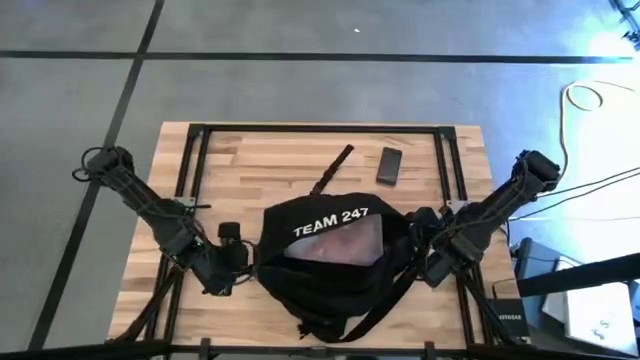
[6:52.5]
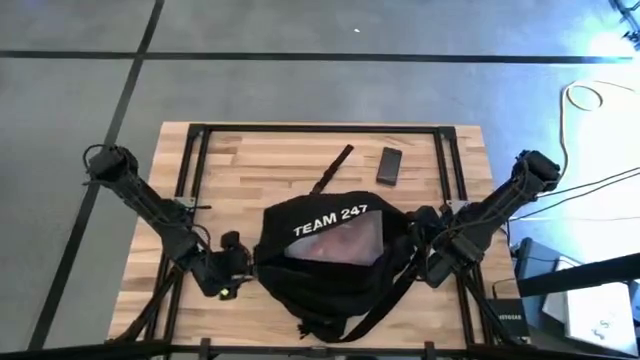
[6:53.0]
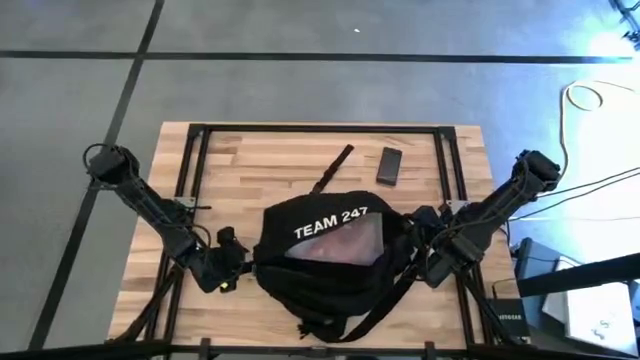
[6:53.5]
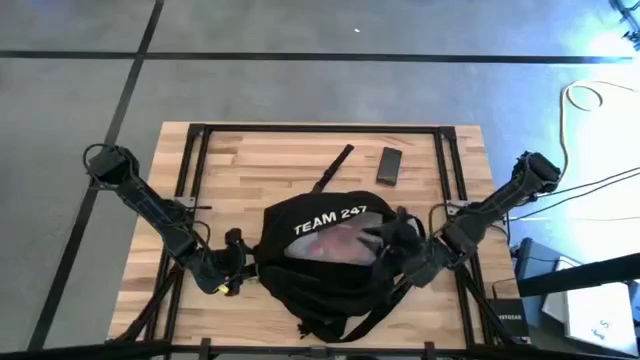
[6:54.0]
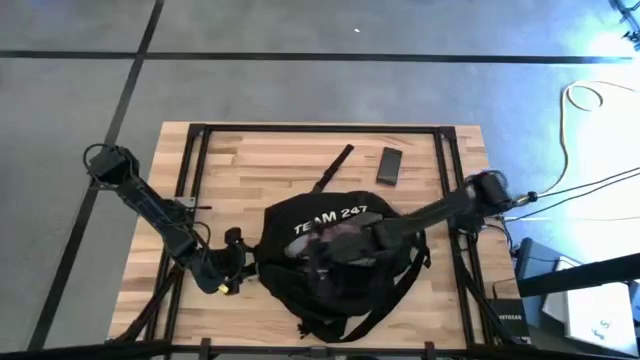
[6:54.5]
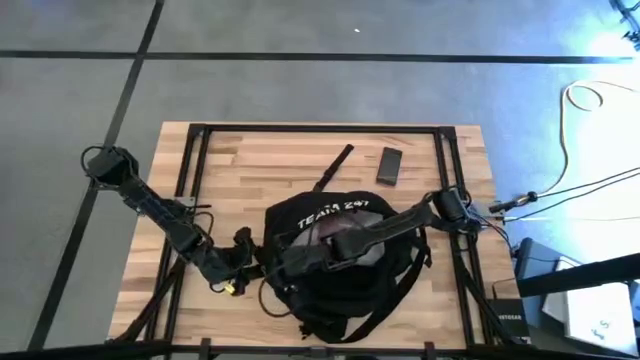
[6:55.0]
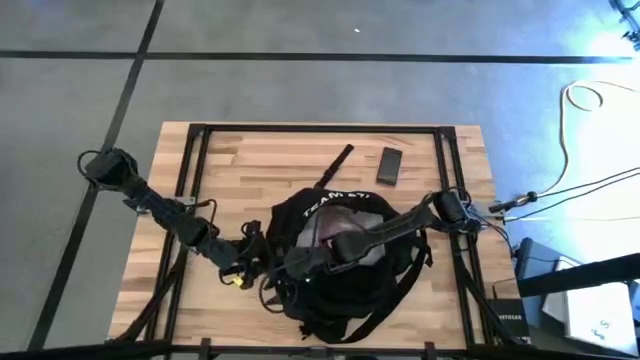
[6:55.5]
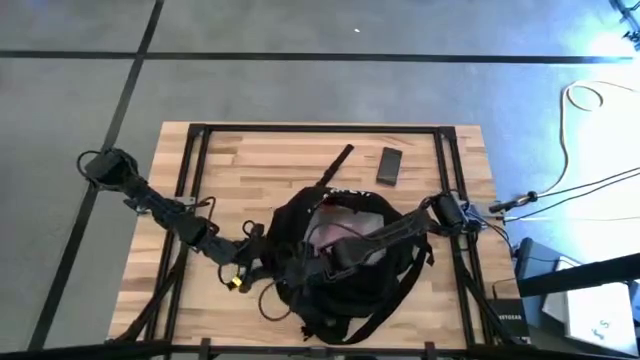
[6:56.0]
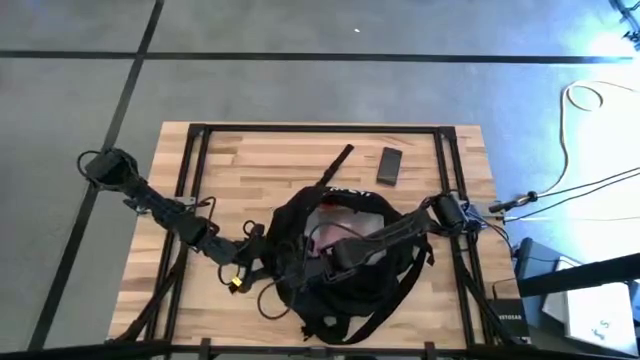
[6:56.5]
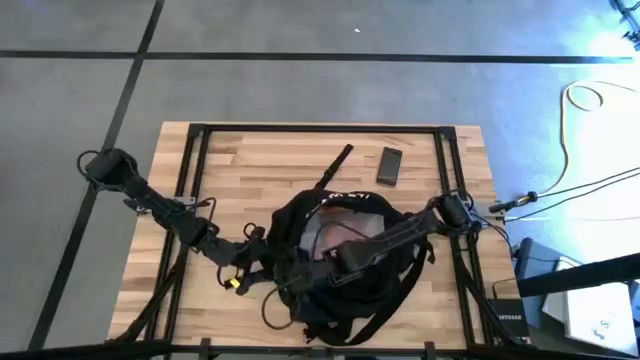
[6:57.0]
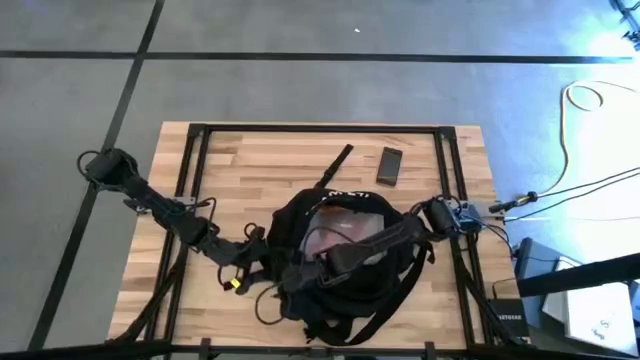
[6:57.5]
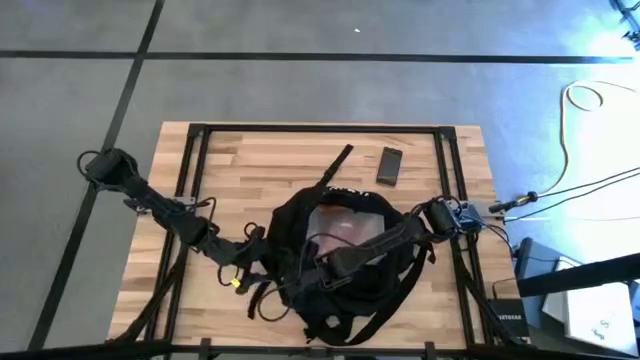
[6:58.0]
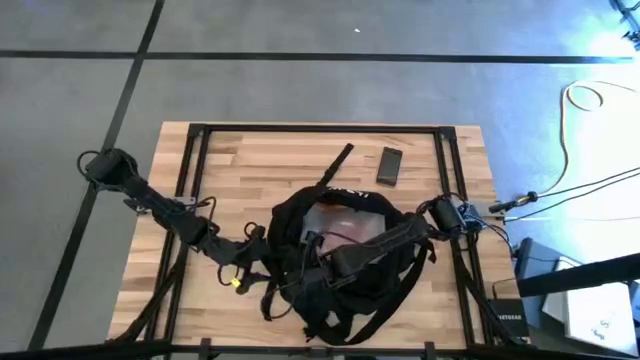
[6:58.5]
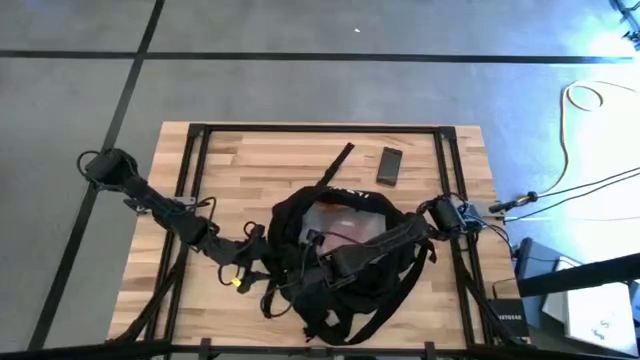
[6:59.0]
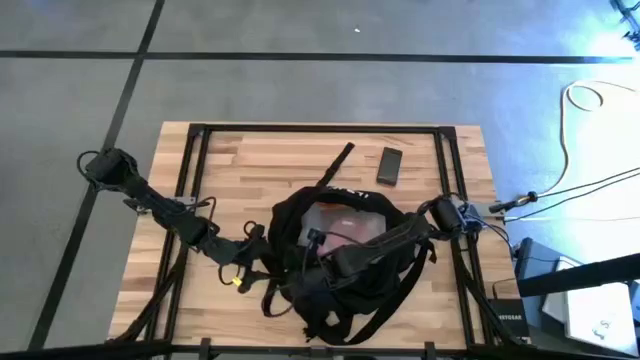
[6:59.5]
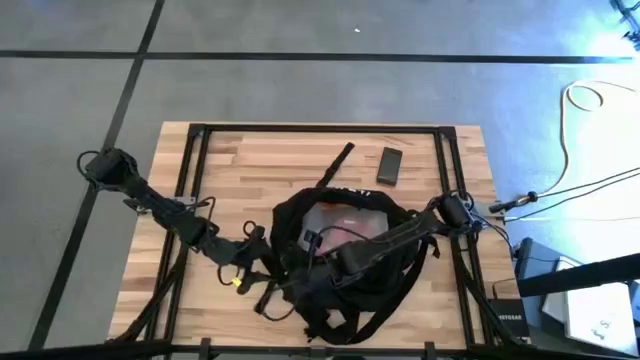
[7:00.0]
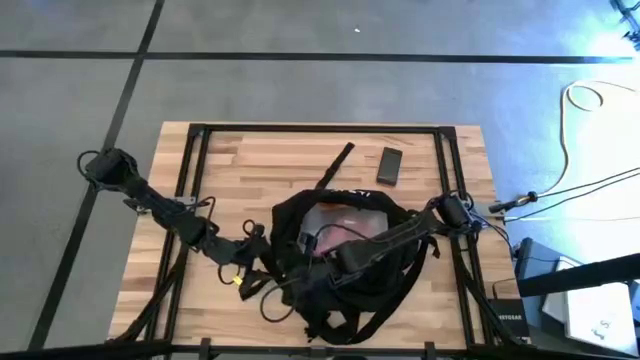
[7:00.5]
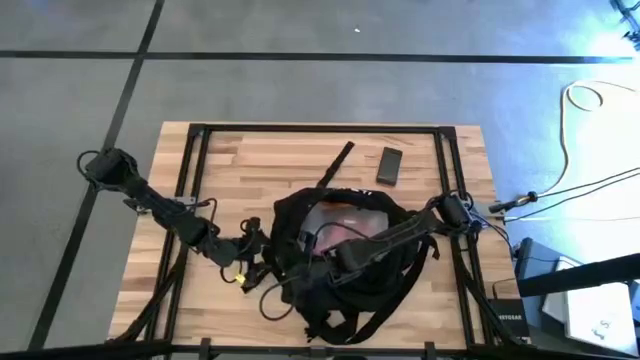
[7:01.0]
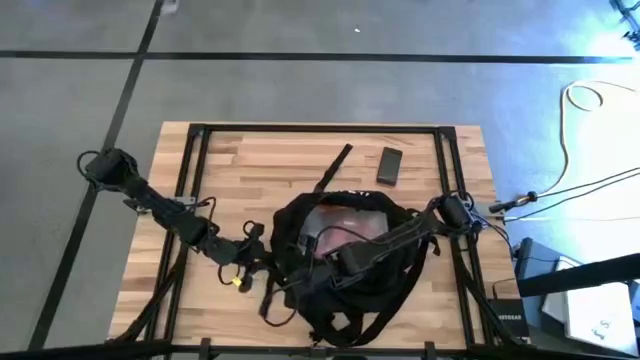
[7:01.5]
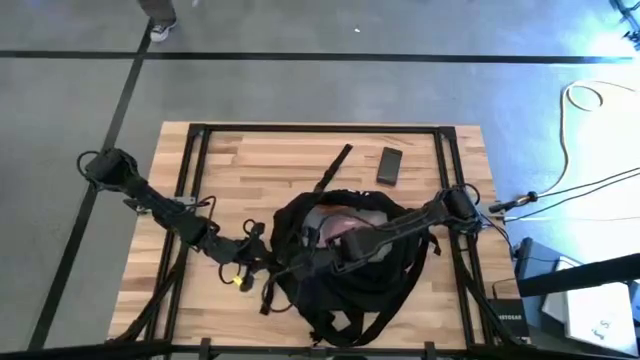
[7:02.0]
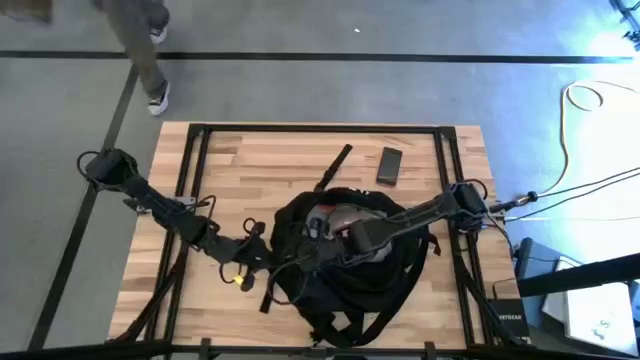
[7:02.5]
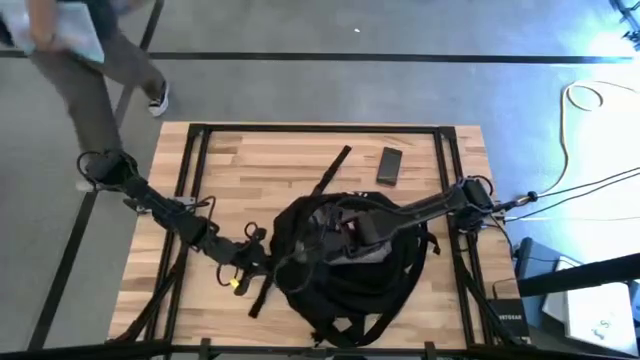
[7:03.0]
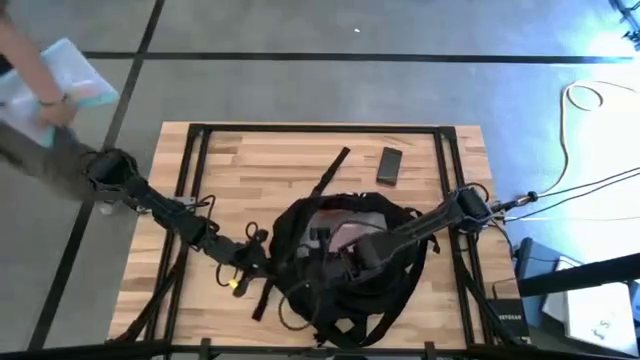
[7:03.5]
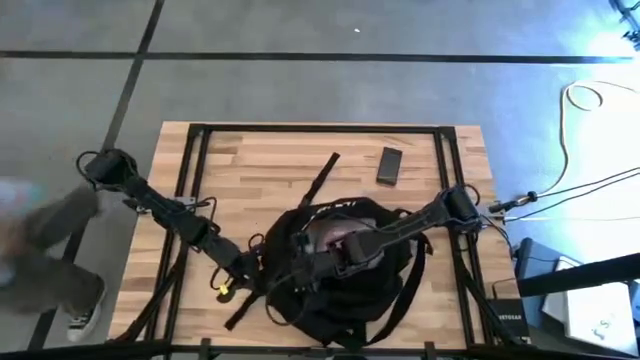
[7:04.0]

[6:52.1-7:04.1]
Task: Unpack backpack
Close the black bag

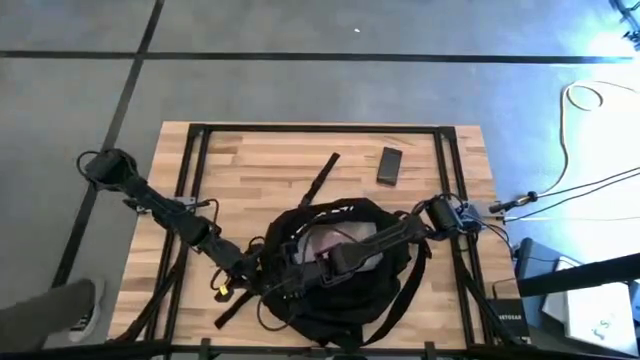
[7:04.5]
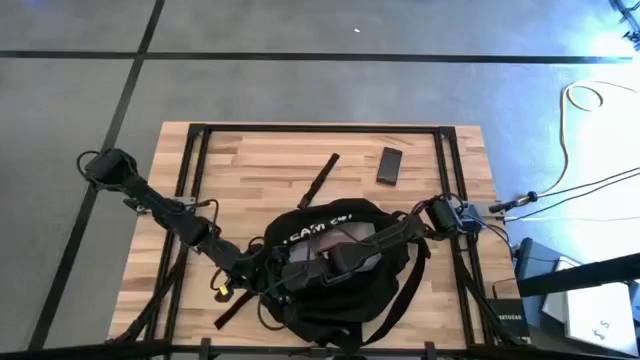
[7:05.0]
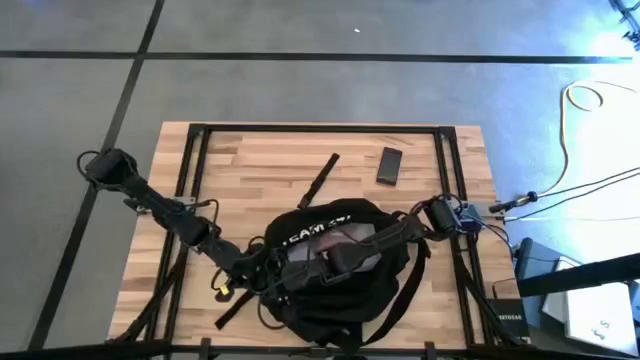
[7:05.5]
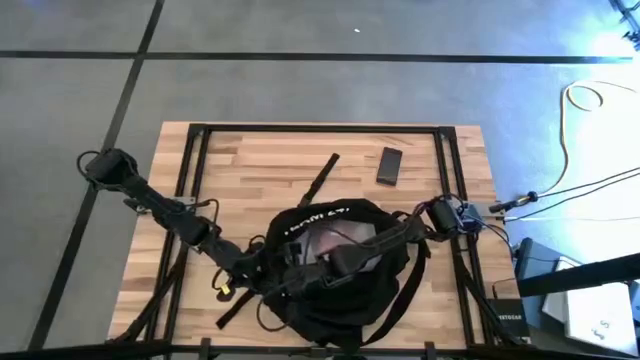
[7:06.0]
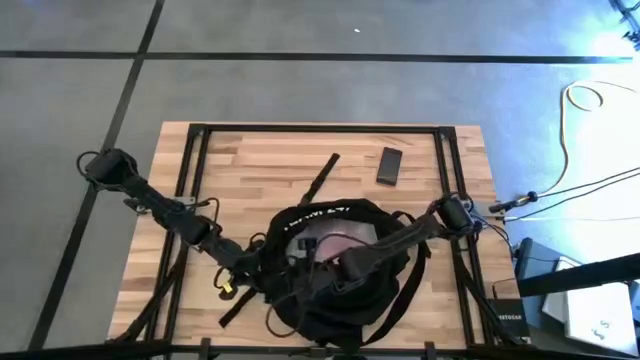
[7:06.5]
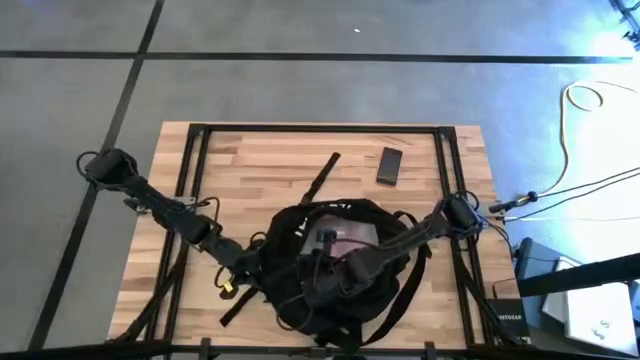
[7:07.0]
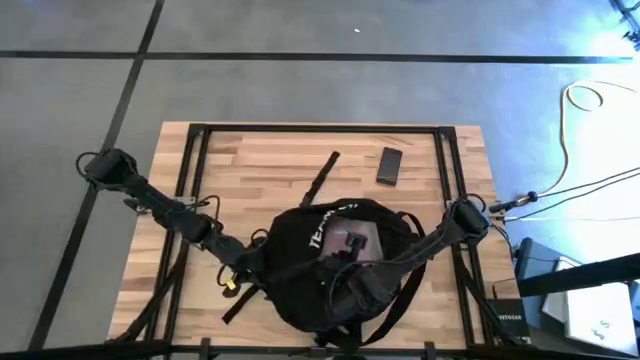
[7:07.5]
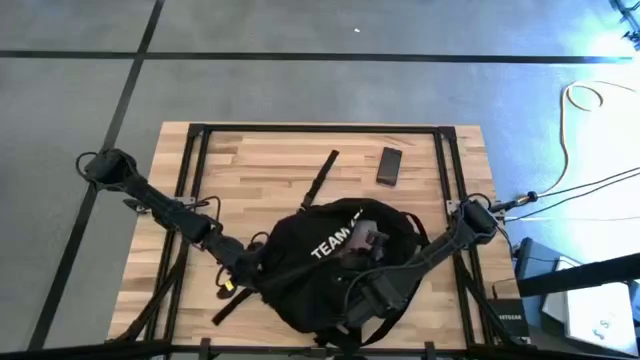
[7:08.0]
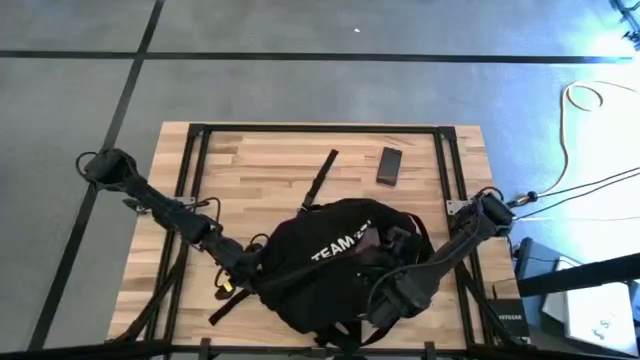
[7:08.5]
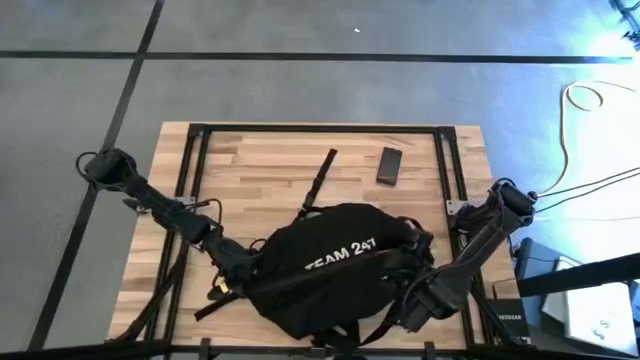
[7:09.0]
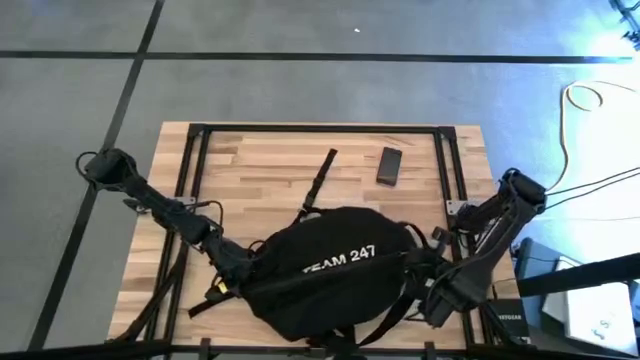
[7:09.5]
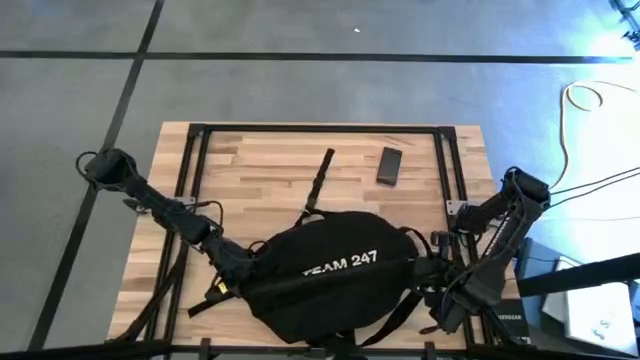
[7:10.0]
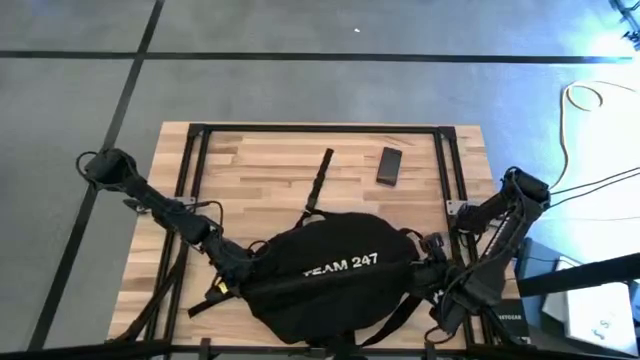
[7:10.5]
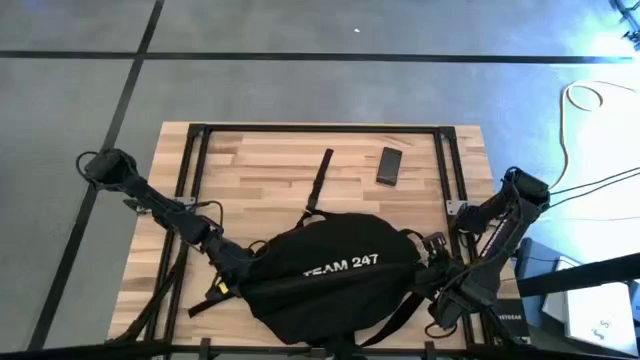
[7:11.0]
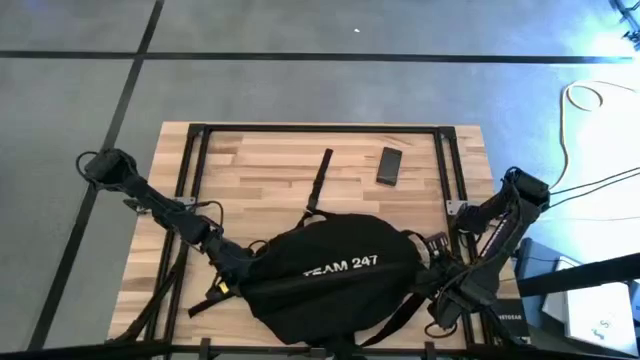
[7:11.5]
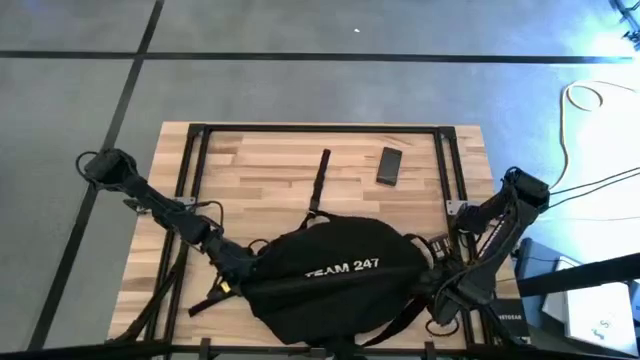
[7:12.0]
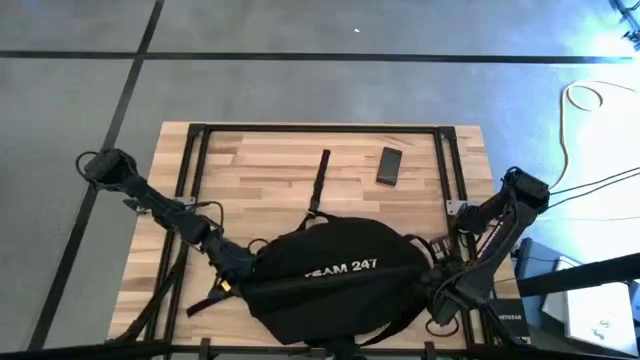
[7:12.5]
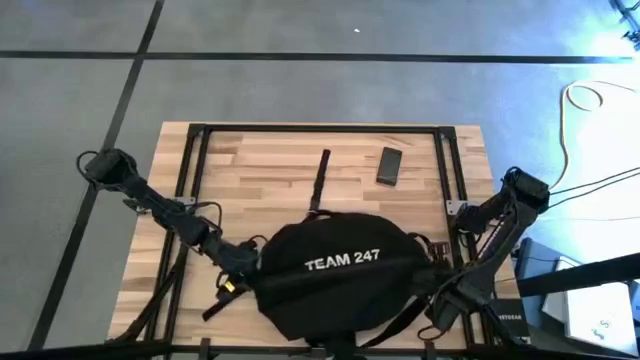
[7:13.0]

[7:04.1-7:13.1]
Close the black bag
